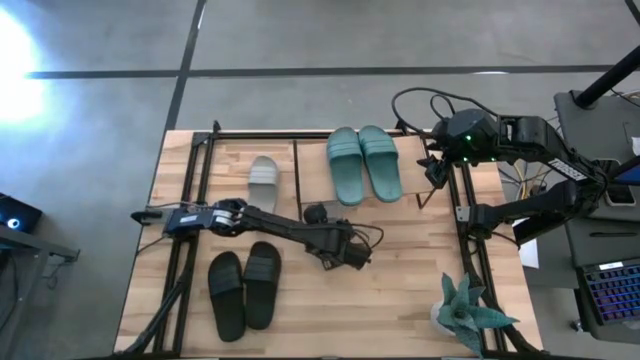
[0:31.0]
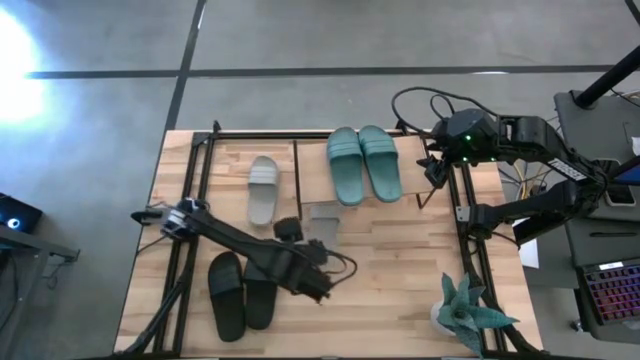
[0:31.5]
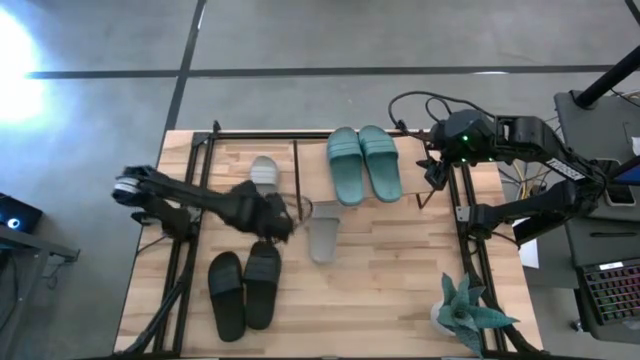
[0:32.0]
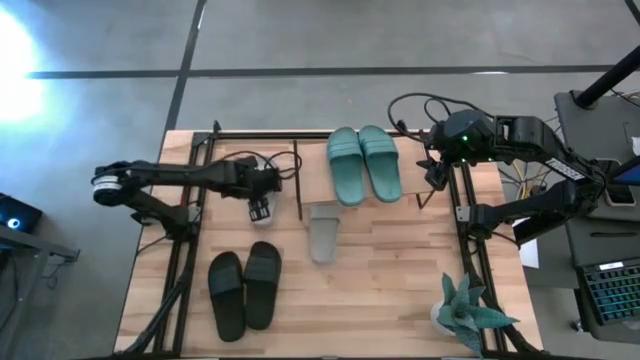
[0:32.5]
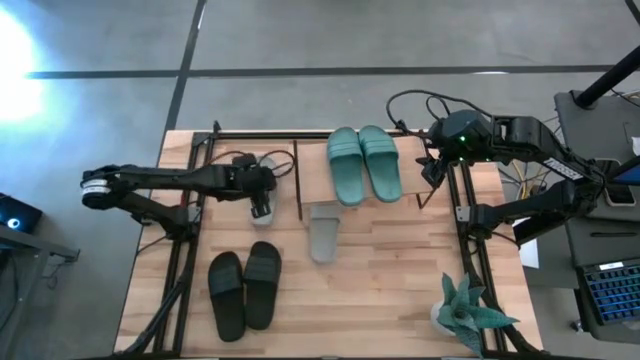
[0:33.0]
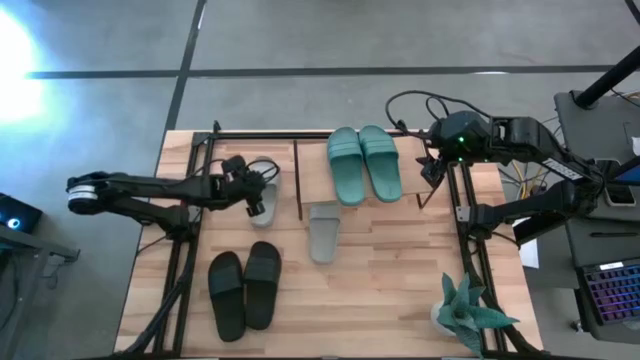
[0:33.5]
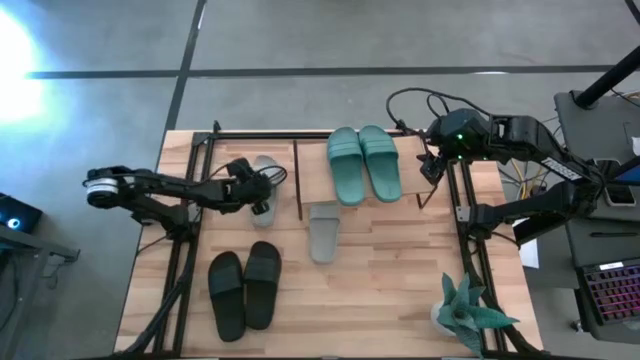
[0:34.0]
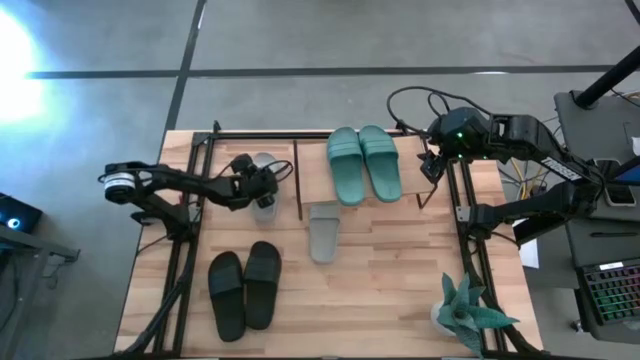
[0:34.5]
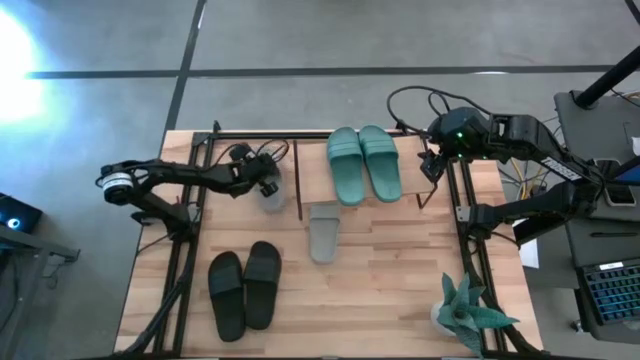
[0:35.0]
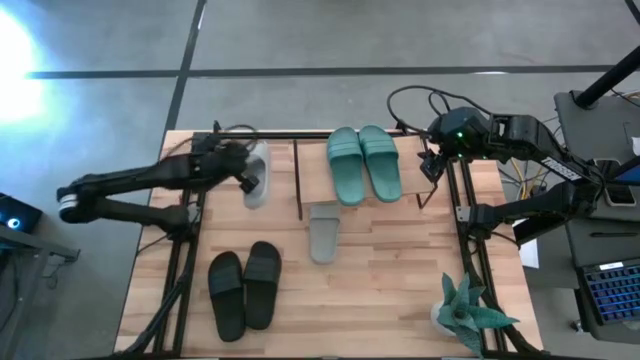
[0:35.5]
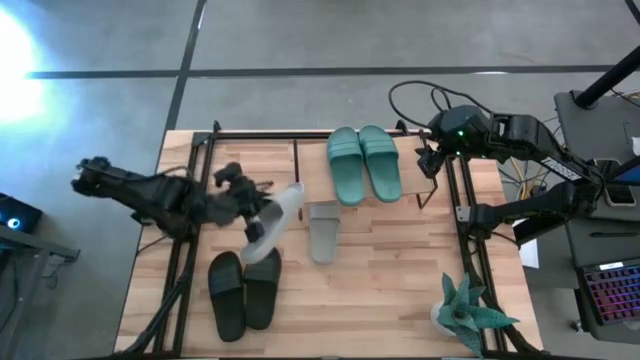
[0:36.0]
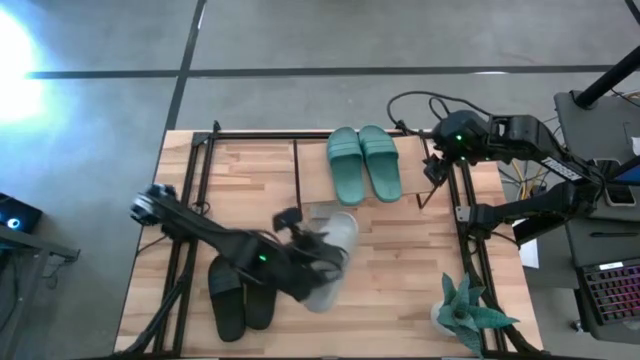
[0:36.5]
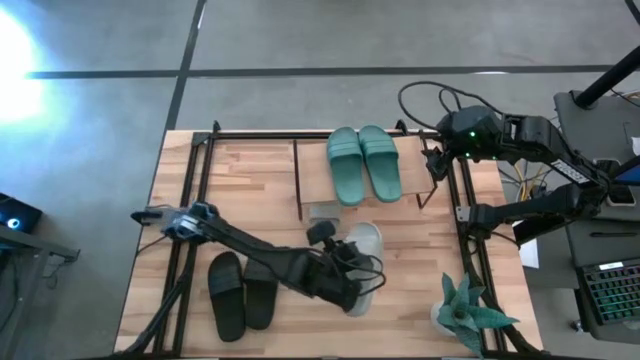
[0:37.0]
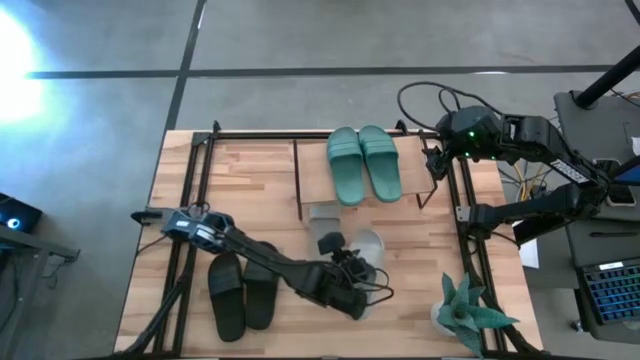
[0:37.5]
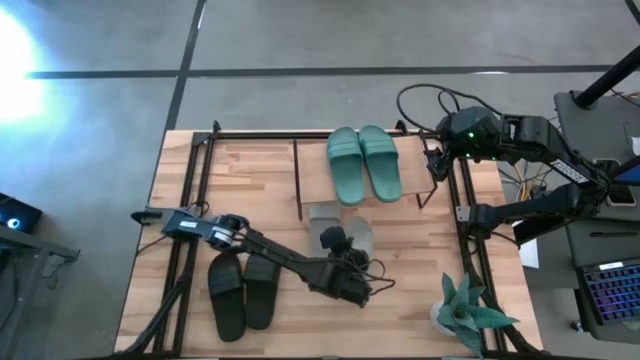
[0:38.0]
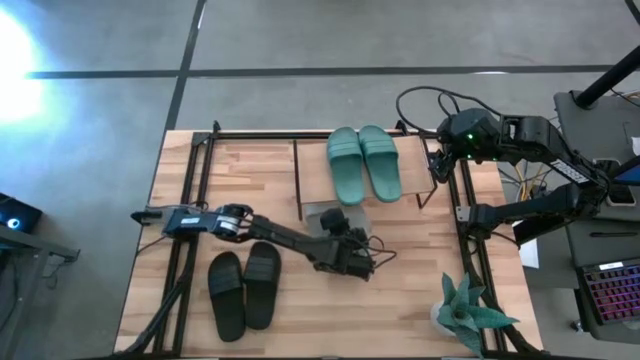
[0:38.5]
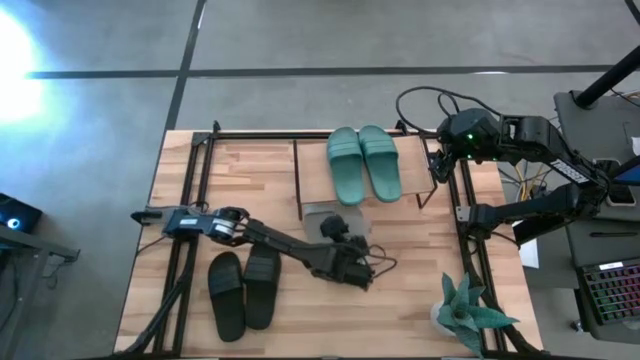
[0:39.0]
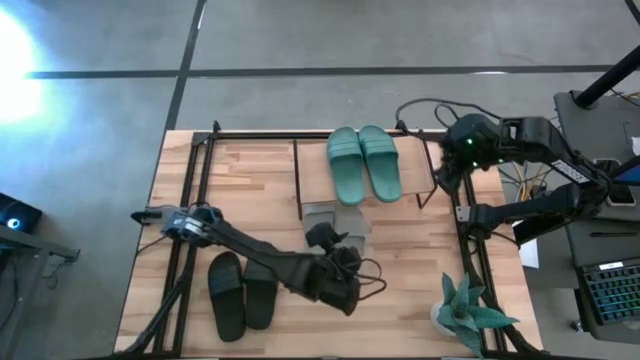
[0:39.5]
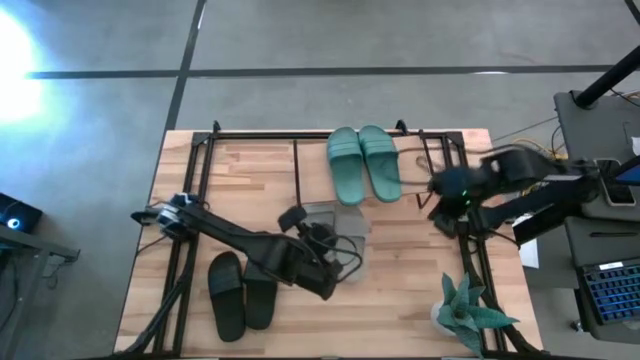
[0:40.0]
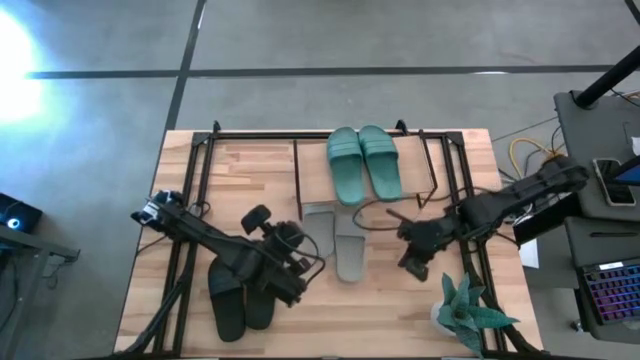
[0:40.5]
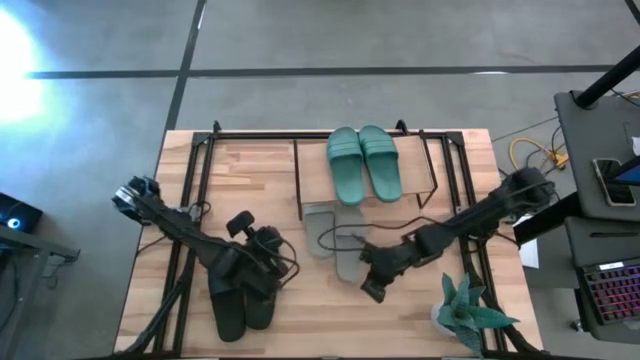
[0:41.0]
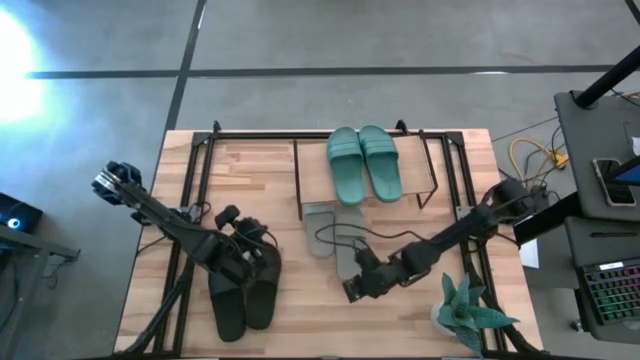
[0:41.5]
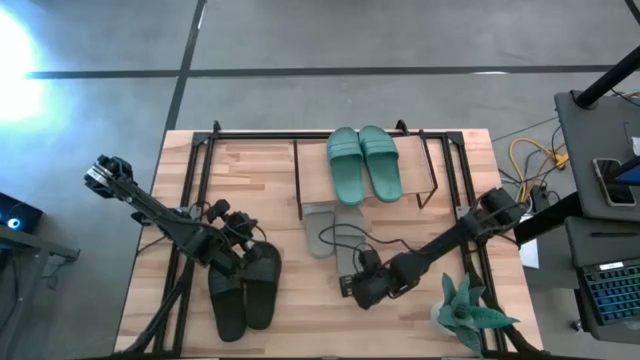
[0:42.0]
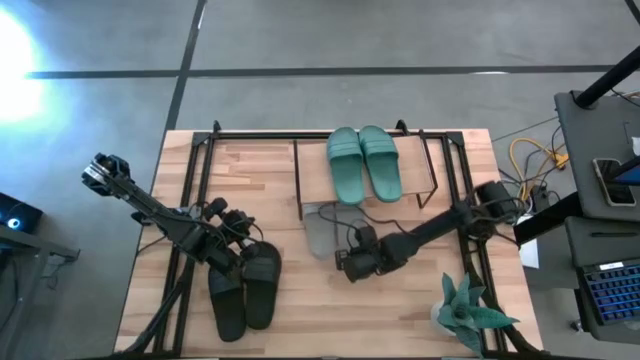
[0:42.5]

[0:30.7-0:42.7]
Task: Pick and place slides into the shelf
Put the gray slide under the shelf

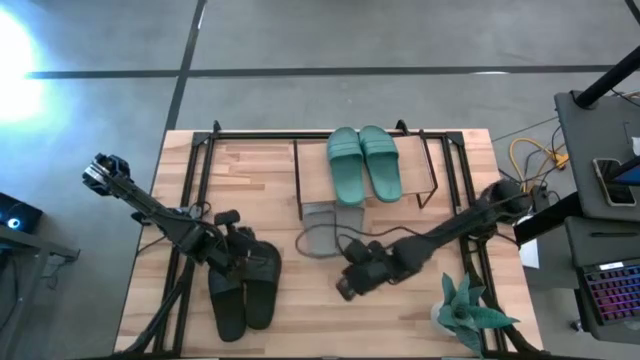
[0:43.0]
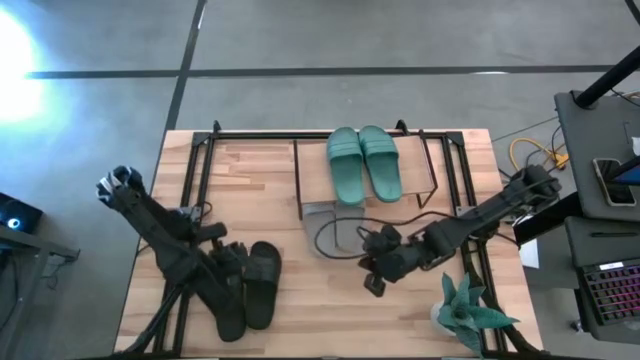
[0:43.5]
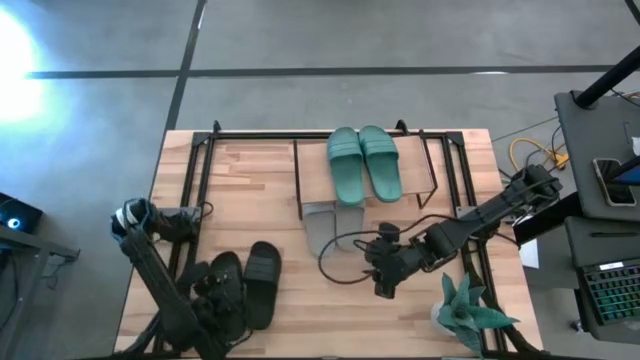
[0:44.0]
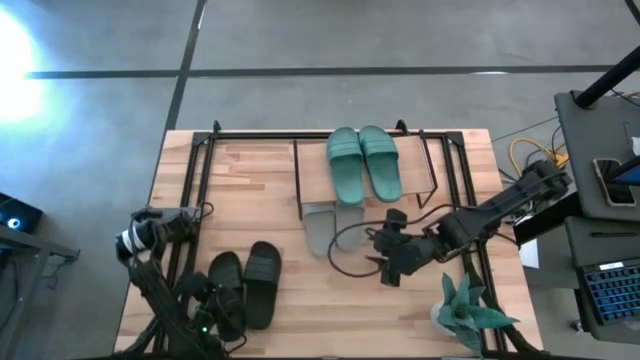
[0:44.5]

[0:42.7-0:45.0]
Put the left black slide under the shelf

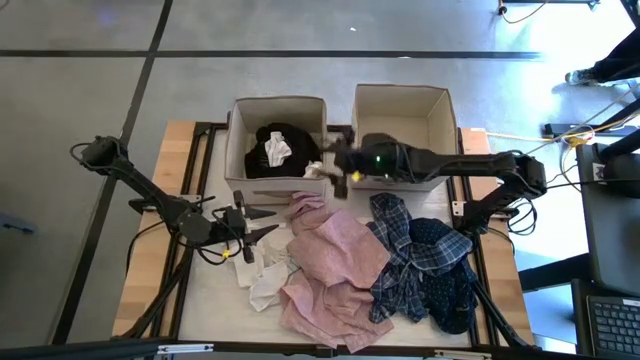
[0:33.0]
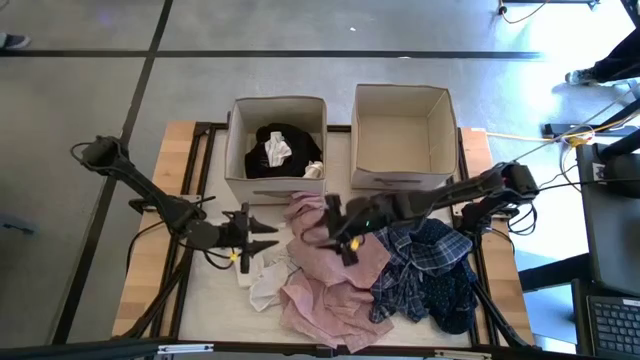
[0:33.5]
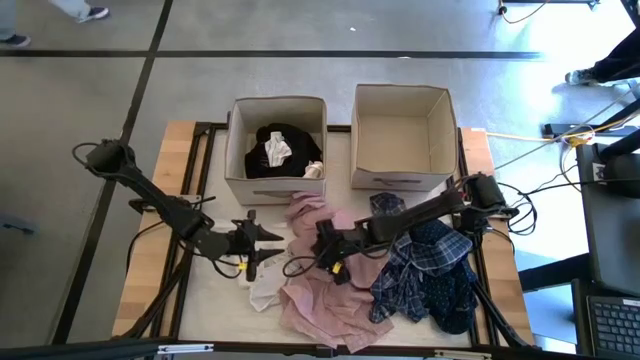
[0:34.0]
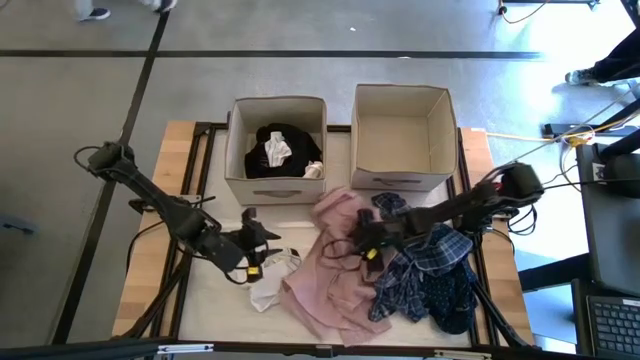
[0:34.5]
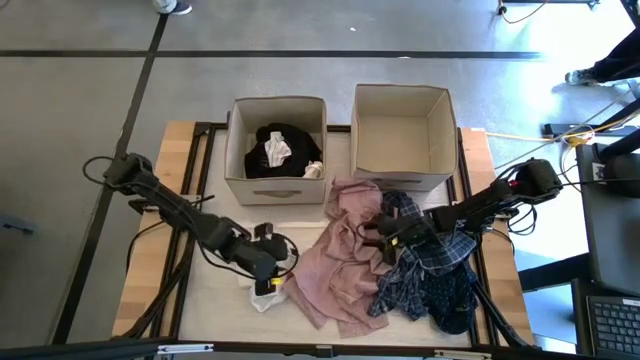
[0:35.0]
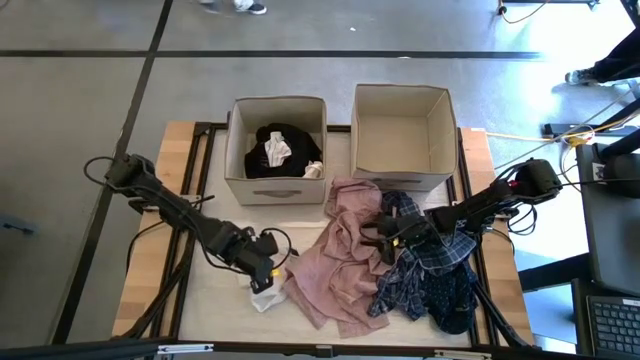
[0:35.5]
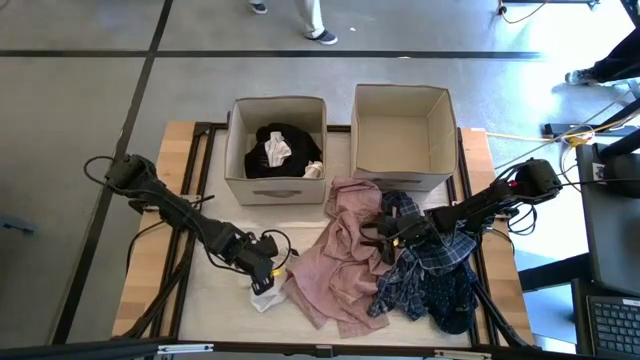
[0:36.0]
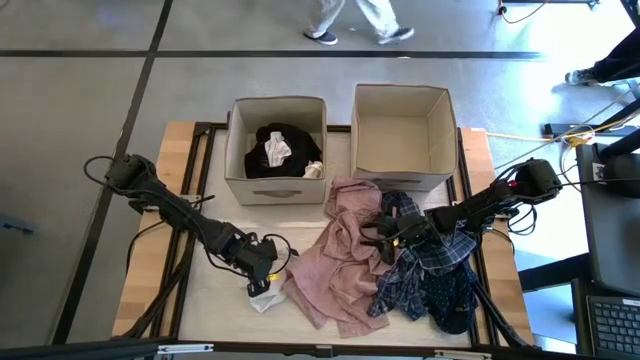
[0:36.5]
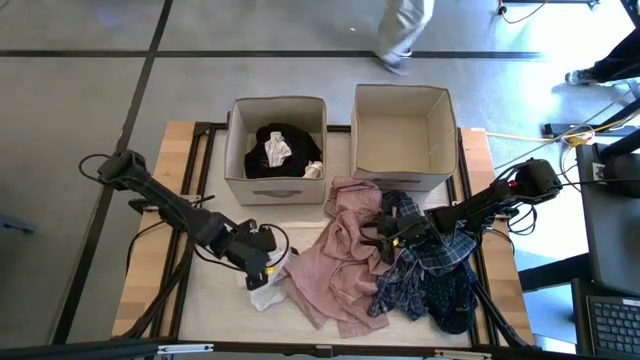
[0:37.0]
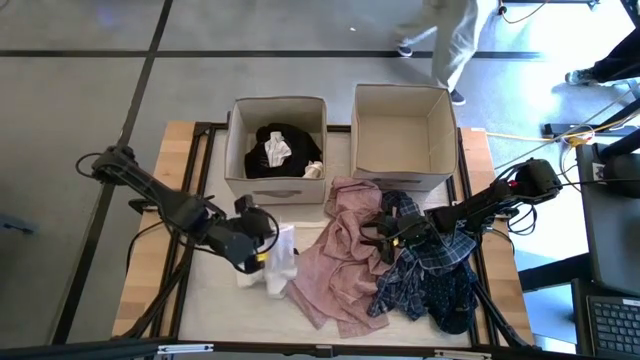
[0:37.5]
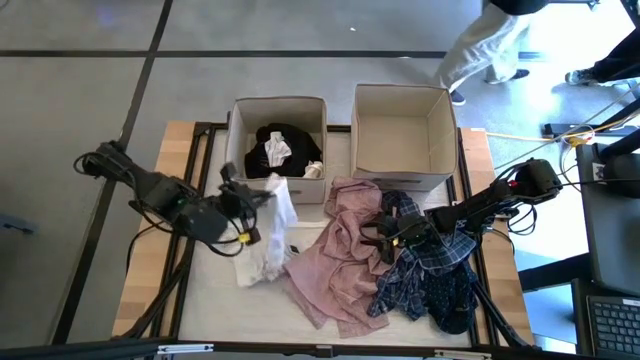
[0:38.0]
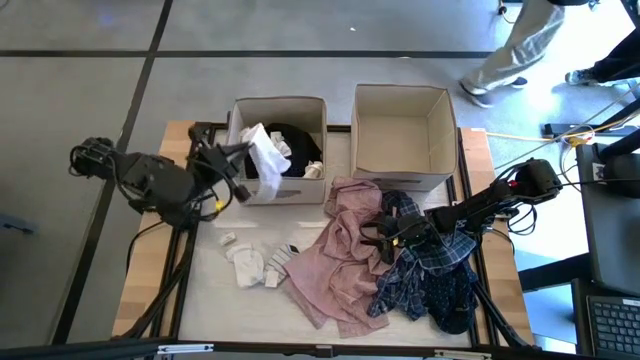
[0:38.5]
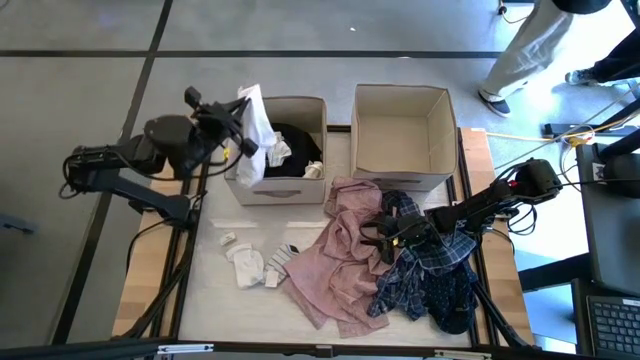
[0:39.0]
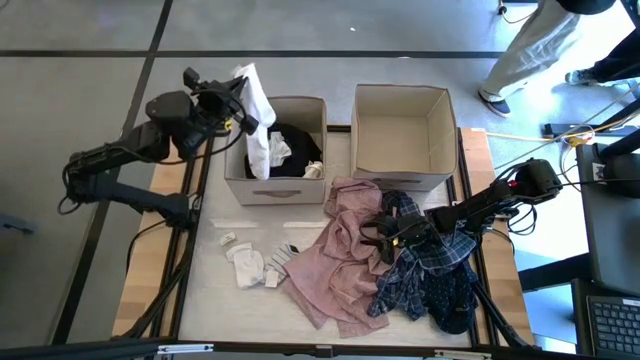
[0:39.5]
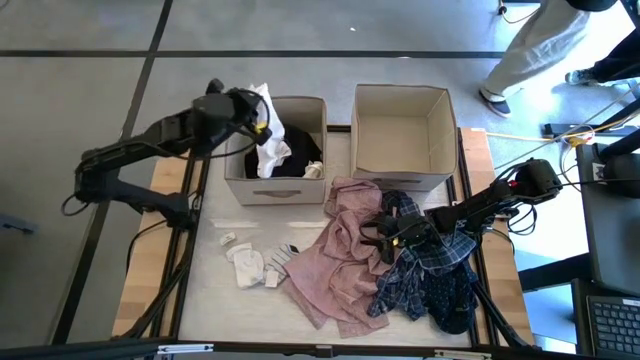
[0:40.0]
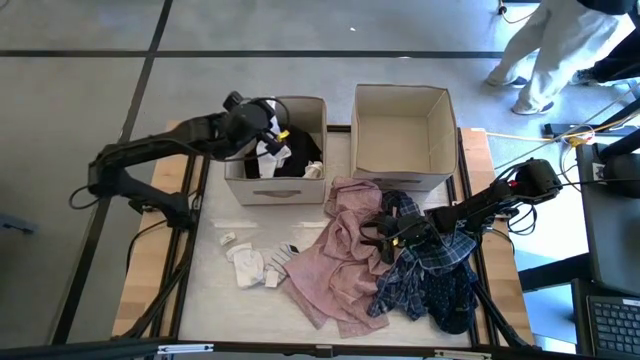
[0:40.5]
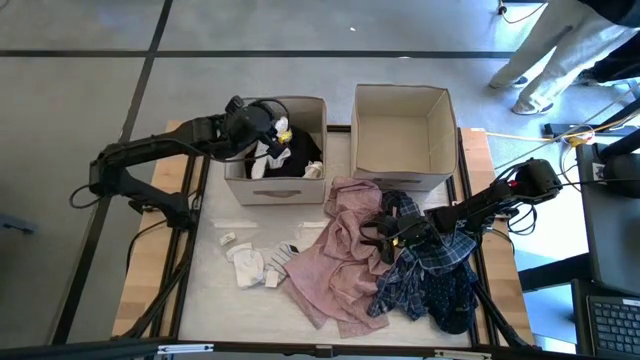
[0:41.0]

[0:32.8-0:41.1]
Task: Sort clothes
Put the white sock into the left laundry organizer
